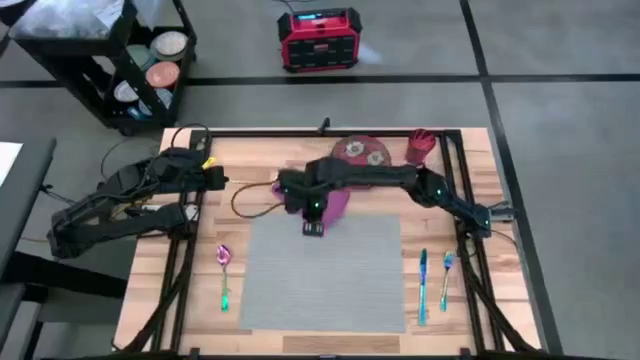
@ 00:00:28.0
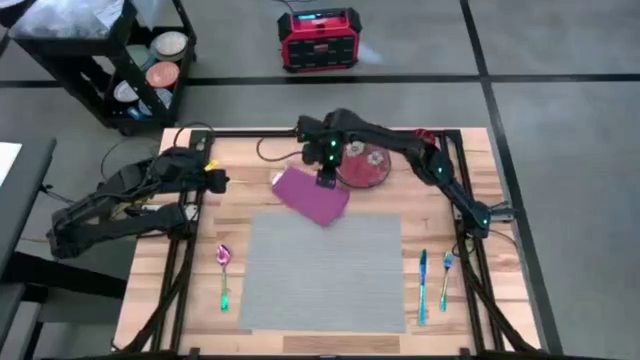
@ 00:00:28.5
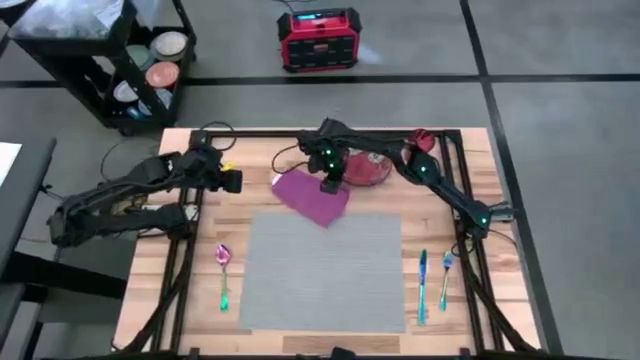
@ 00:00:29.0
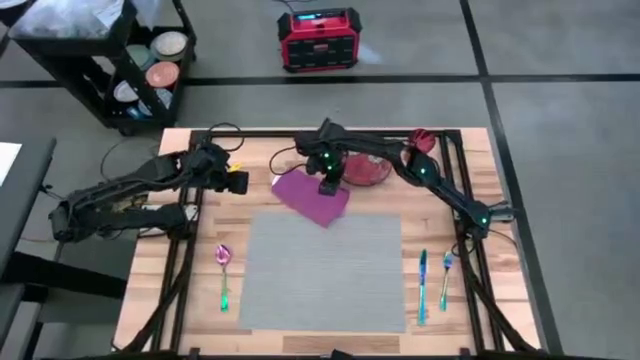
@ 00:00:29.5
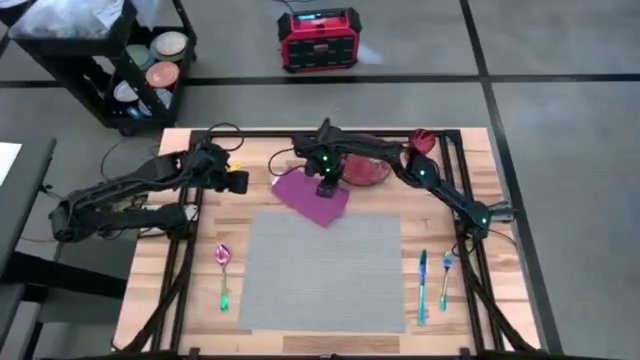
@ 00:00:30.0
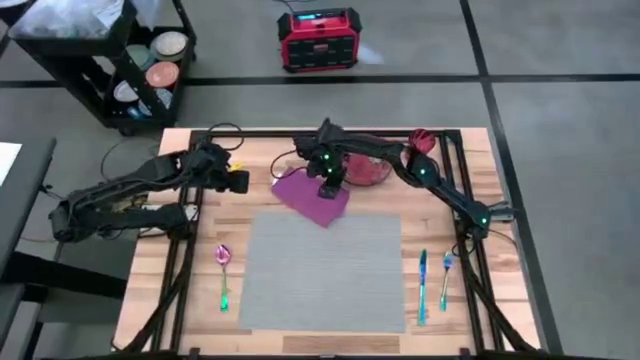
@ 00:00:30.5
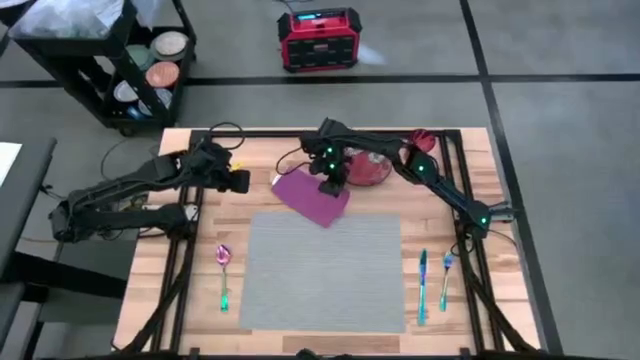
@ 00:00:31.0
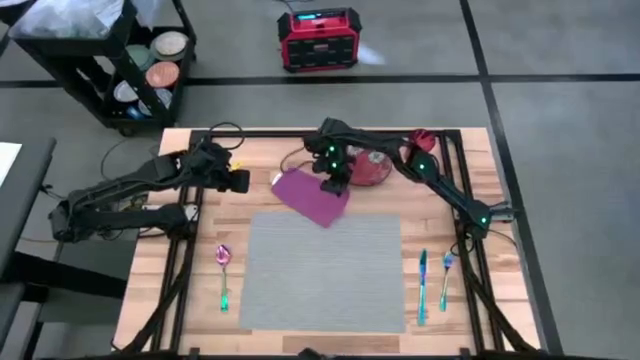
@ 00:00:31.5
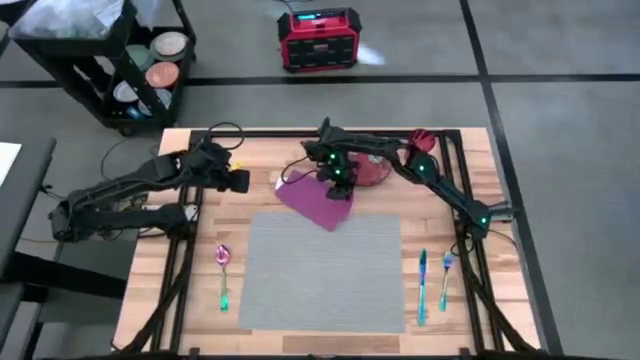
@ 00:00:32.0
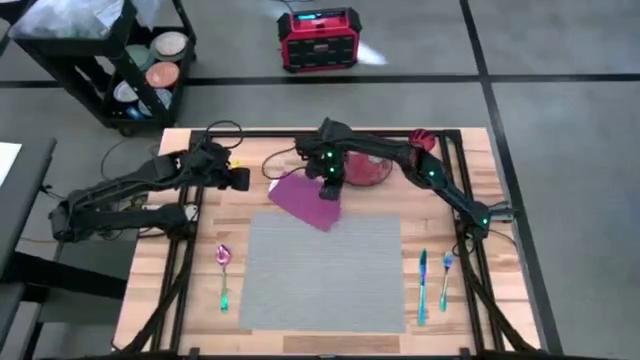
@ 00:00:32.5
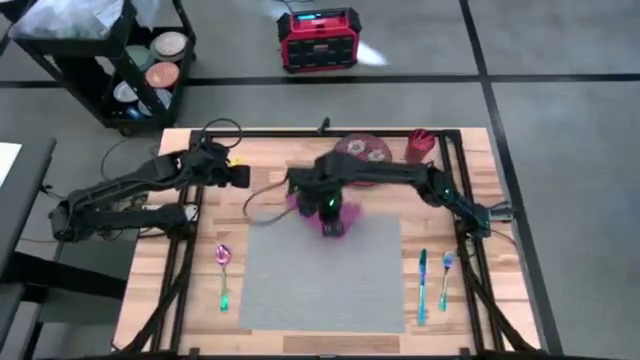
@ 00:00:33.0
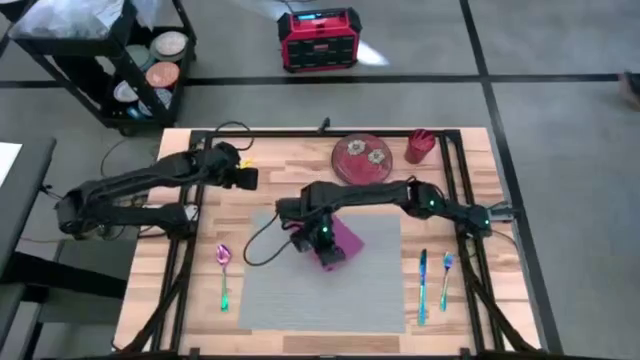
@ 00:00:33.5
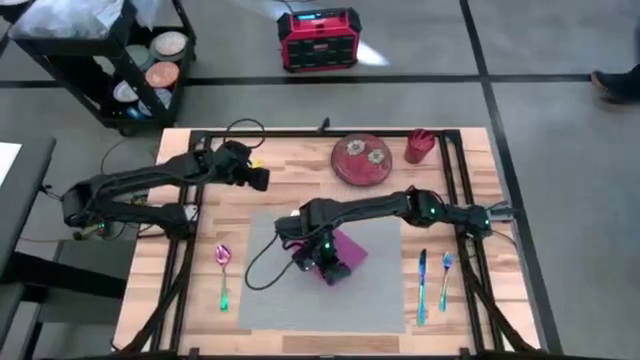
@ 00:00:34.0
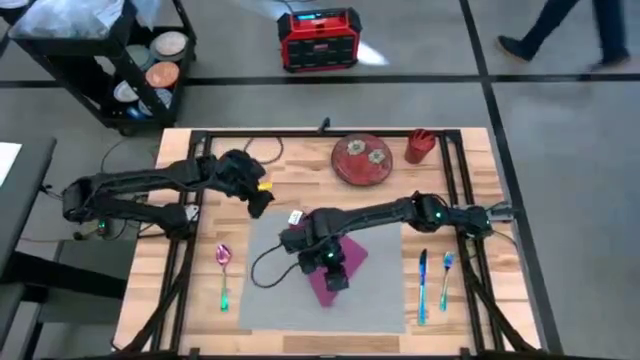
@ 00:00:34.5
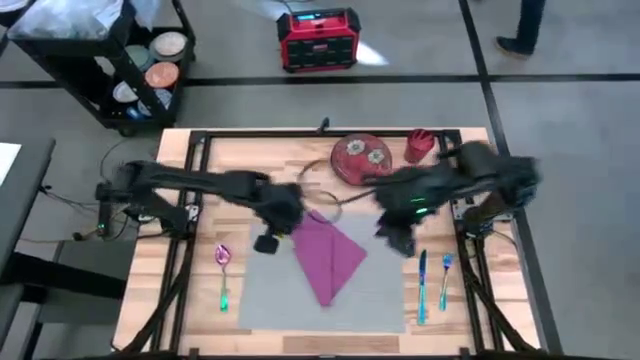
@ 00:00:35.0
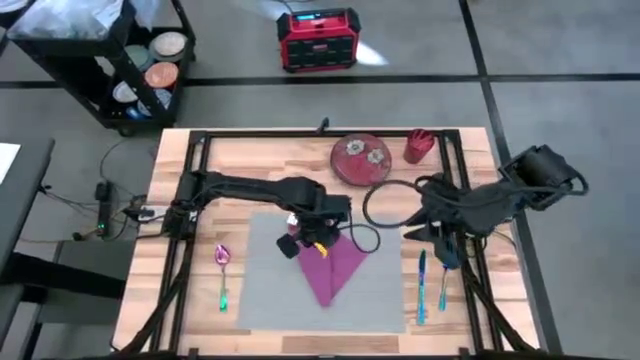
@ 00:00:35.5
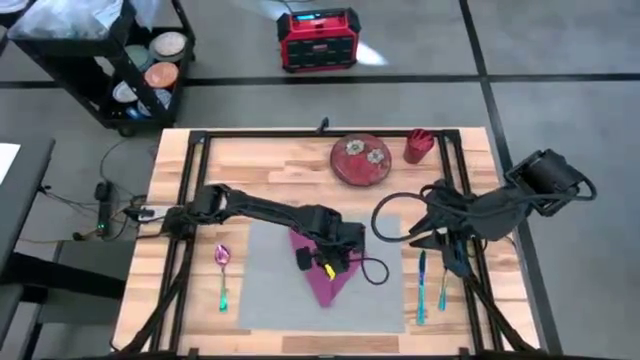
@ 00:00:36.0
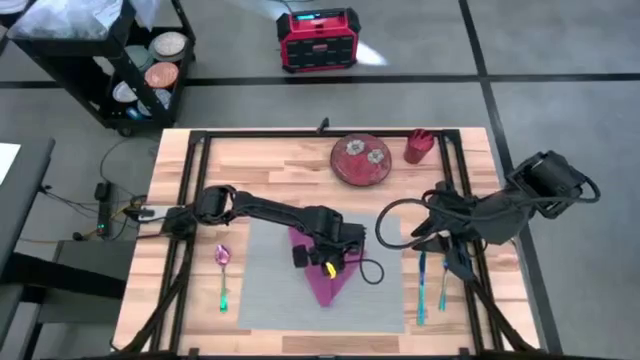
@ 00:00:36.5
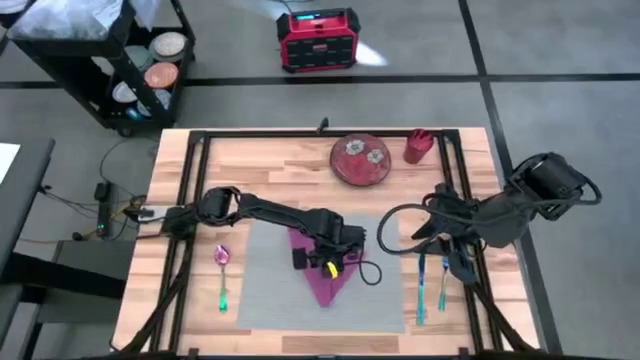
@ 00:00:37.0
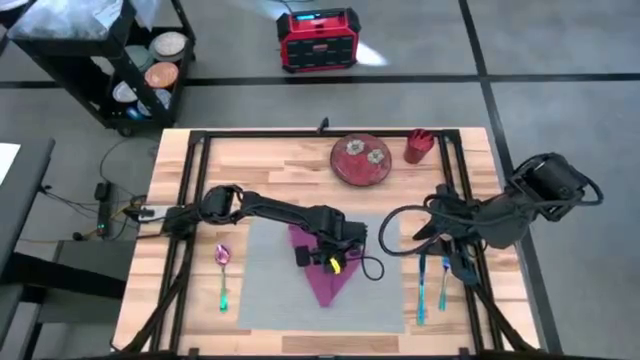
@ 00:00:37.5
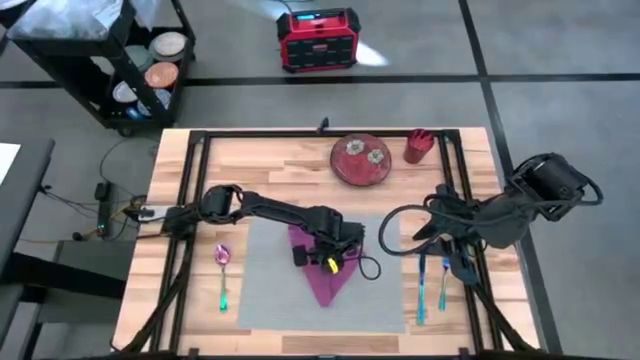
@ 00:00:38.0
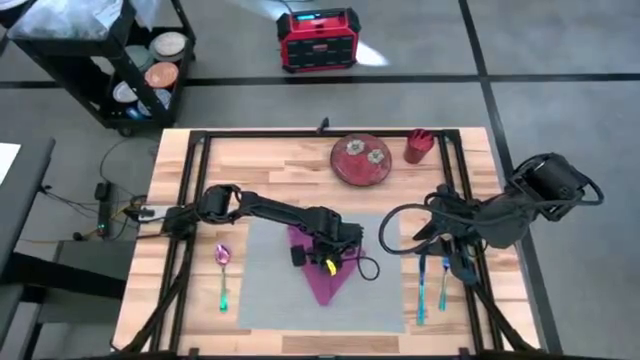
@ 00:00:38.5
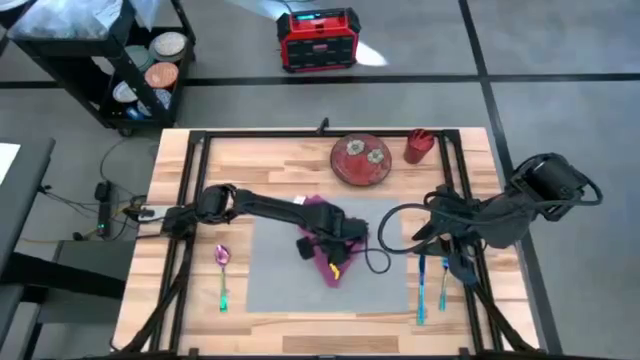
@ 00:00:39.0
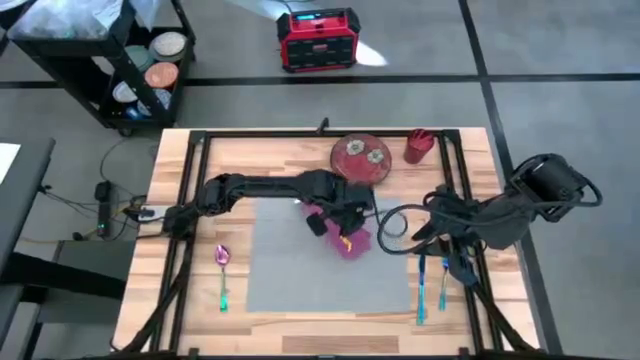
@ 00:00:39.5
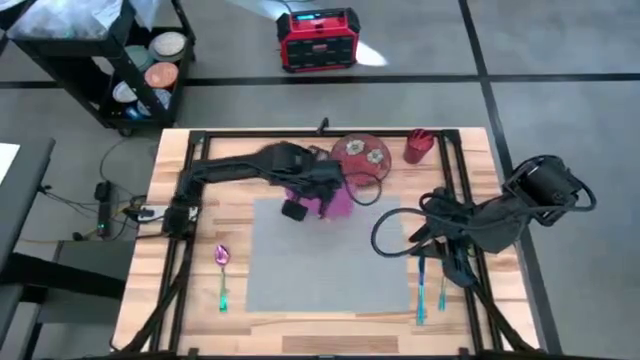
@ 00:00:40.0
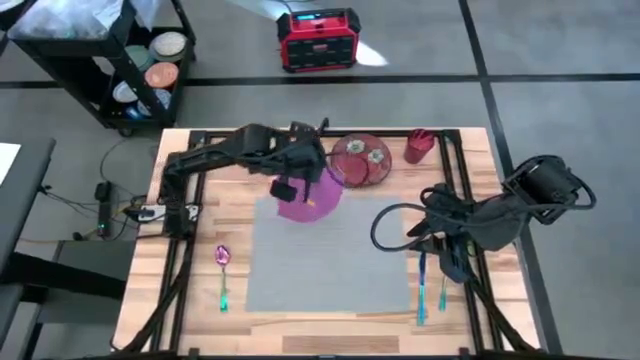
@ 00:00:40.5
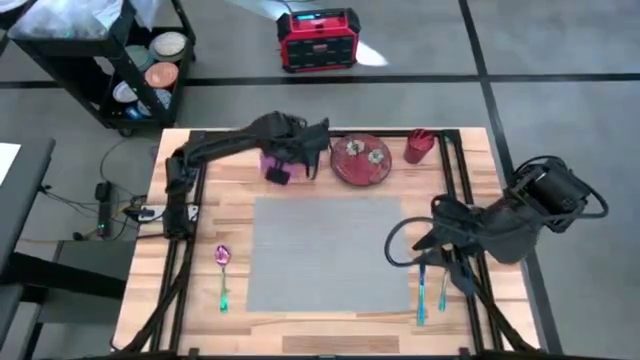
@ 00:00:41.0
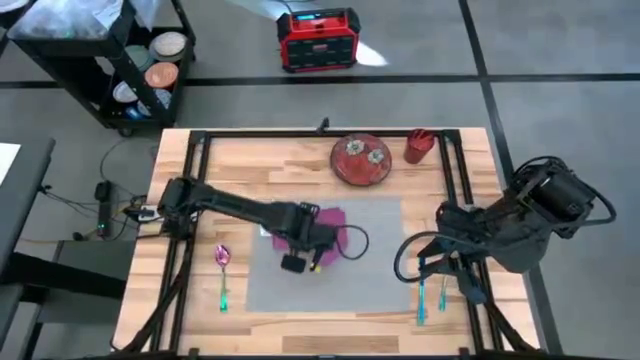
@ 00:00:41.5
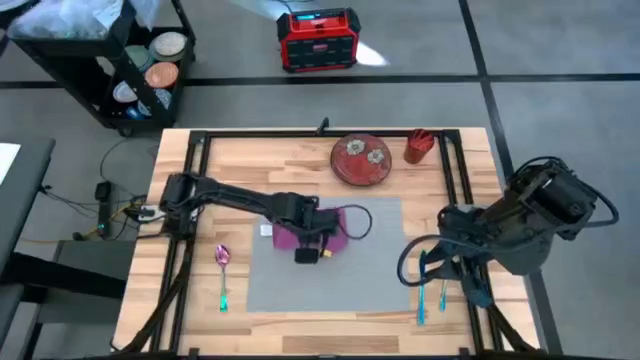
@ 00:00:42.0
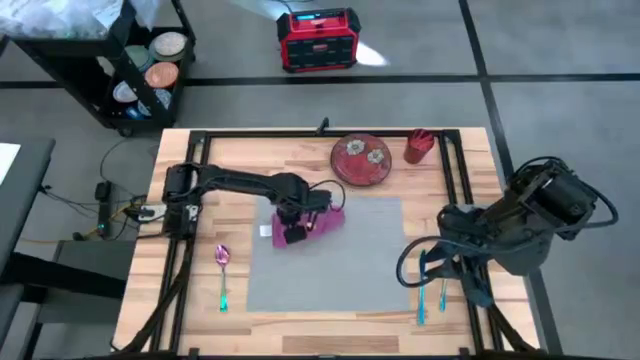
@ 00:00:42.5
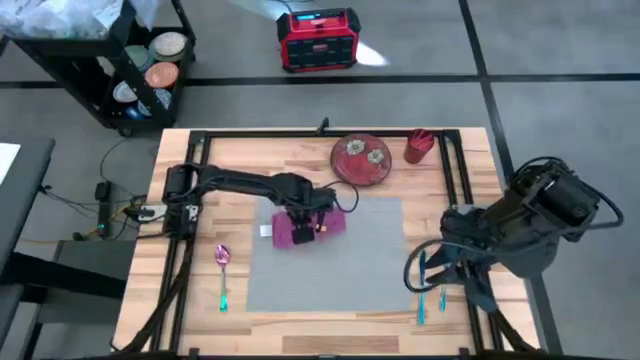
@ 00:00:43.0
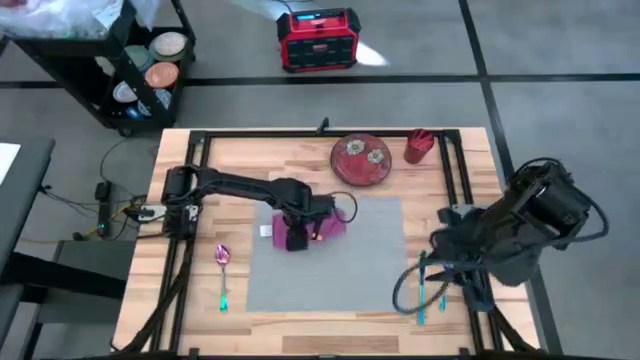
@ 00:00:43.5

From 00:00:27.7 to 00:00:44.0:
Task: Set table place
Fold the violet table napkin on the gray table mat

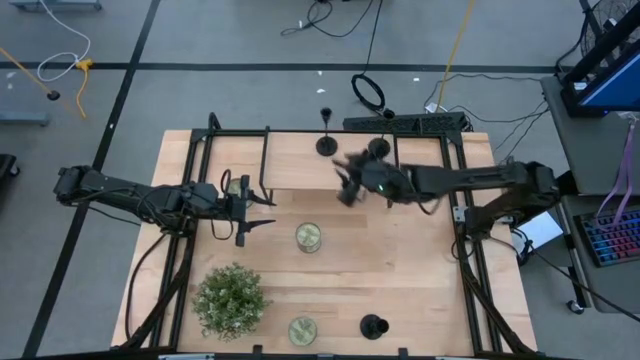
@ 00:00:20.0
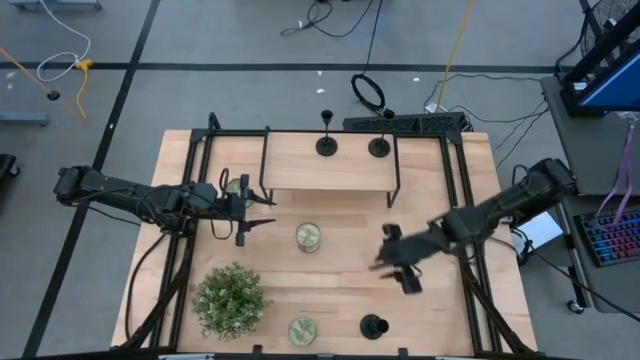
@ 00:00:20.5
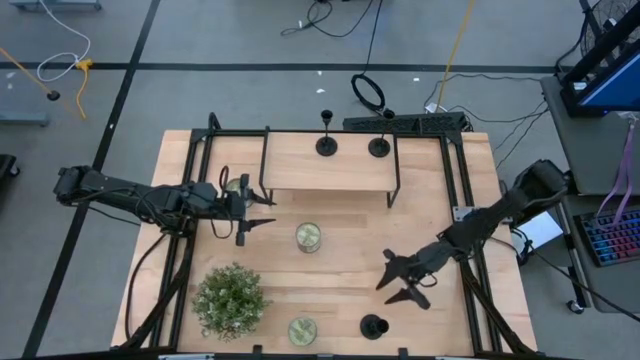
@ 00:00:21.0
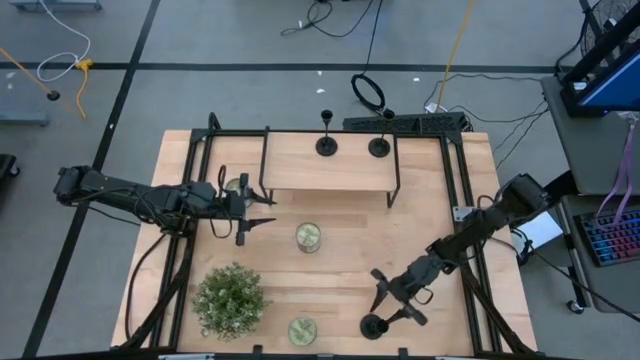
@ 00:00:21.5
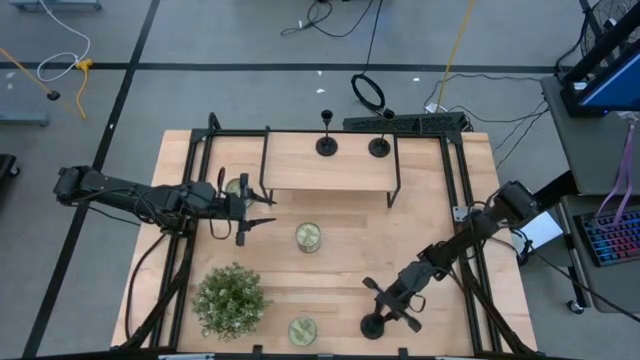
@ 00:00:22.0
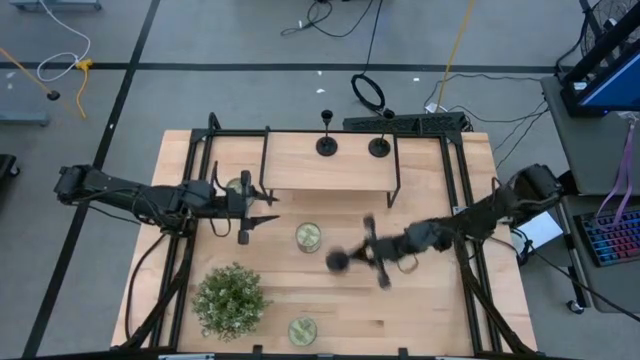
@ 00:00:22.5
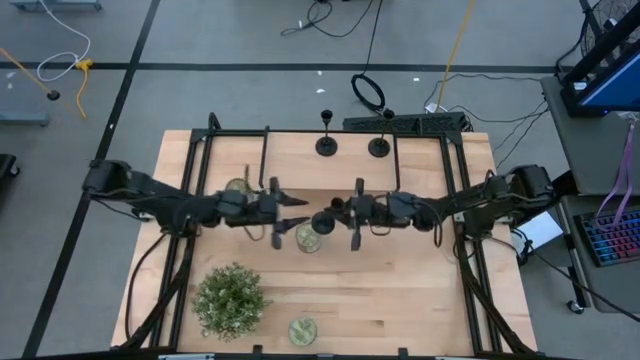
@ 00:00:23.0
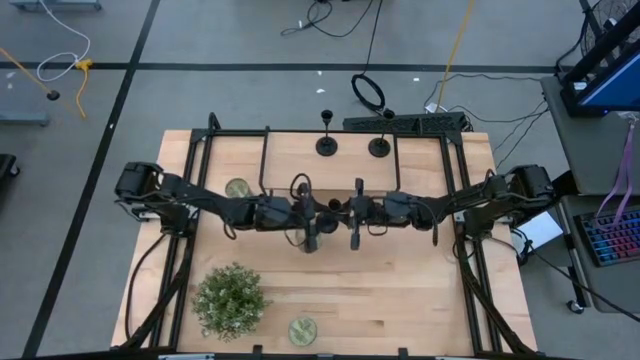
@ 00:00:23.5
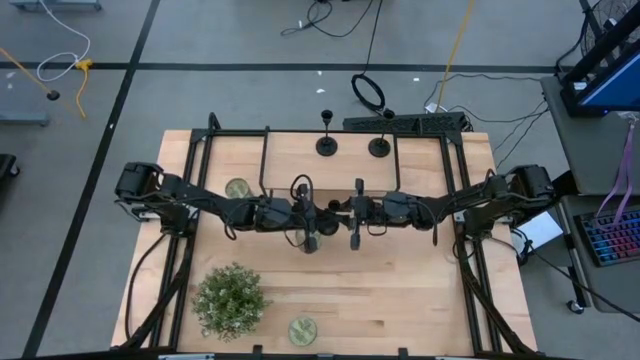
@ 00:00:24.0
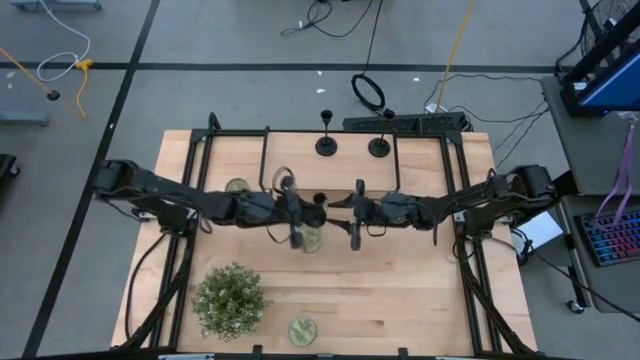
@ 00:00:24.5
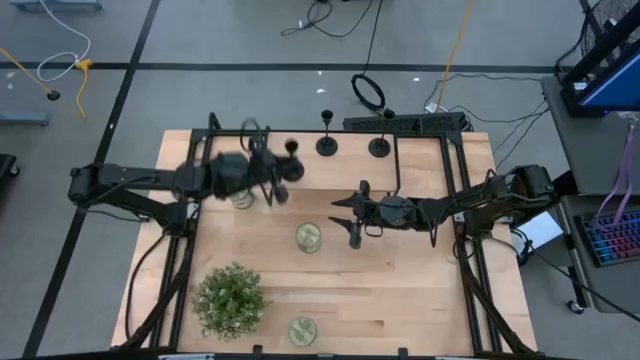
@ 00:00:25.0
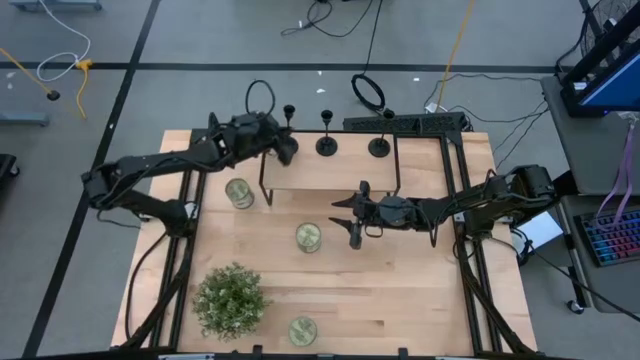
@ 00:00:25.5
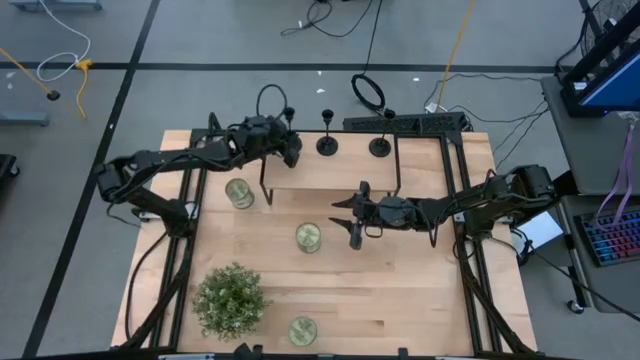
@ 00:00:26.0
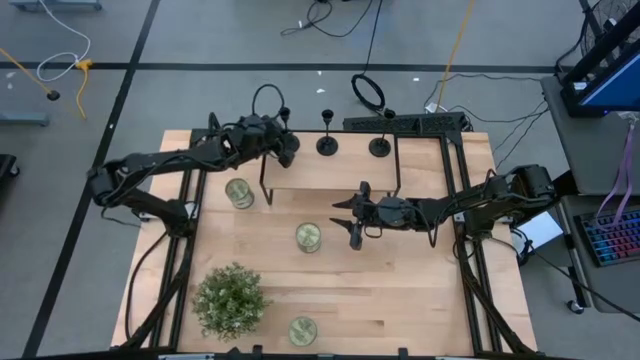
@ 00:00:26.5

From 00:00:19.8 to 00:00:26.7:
Task: Pick & Place candle stick holders
Put the black candle holder on the shelf
